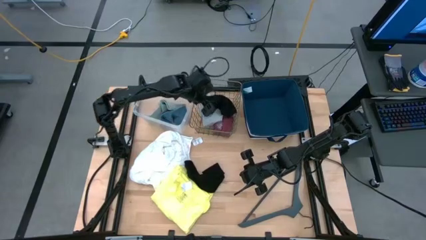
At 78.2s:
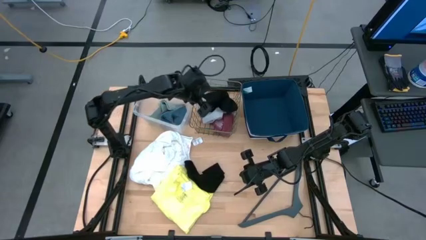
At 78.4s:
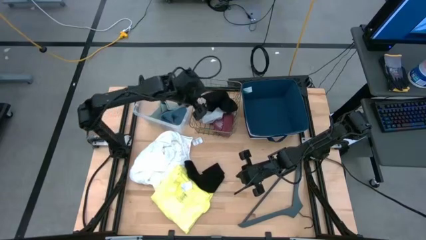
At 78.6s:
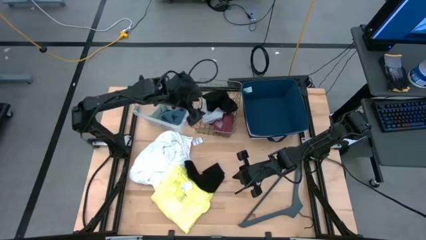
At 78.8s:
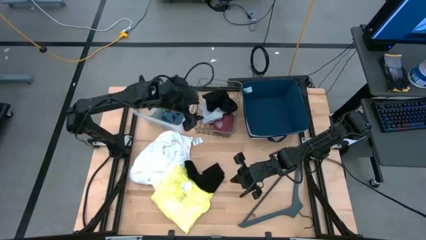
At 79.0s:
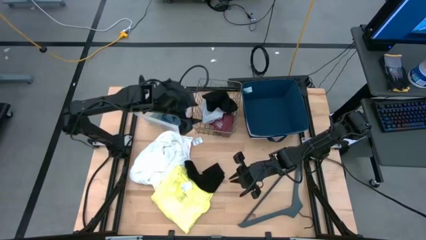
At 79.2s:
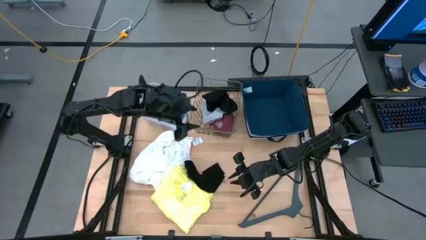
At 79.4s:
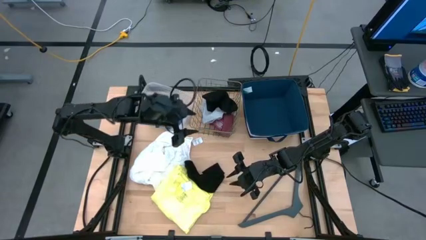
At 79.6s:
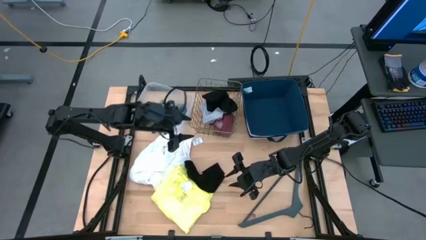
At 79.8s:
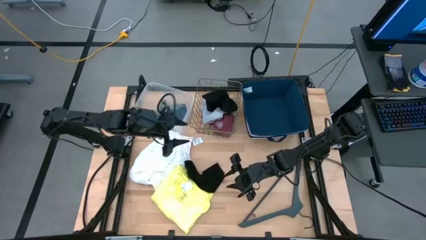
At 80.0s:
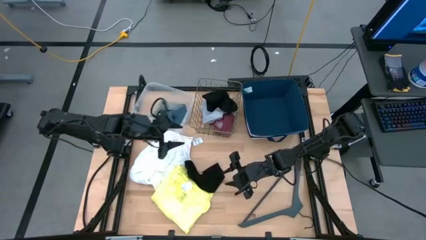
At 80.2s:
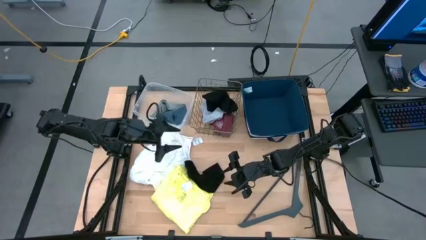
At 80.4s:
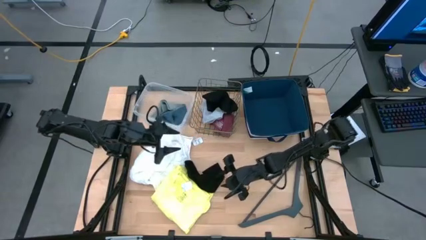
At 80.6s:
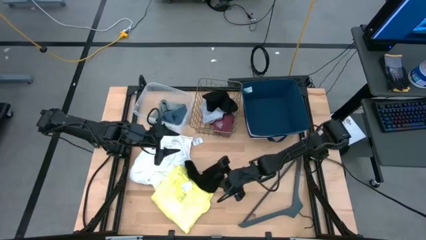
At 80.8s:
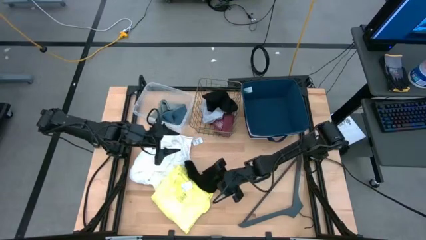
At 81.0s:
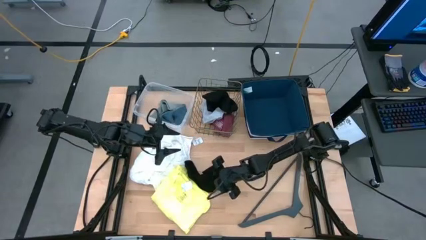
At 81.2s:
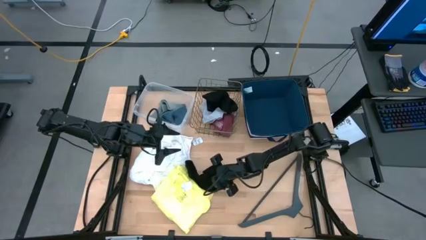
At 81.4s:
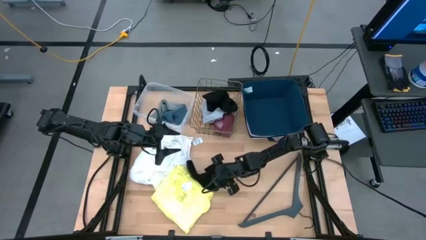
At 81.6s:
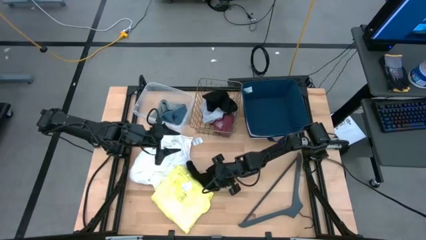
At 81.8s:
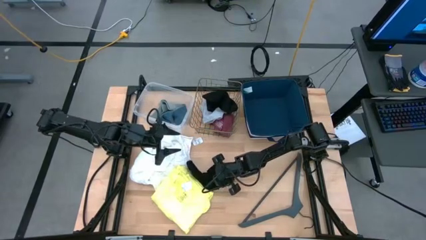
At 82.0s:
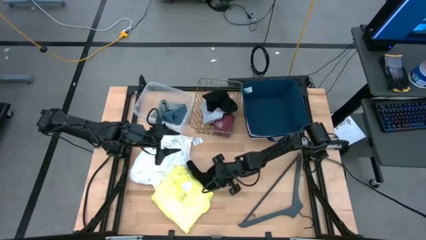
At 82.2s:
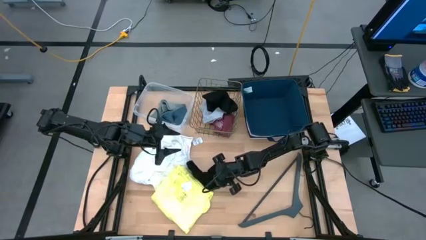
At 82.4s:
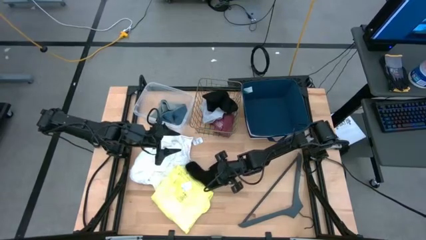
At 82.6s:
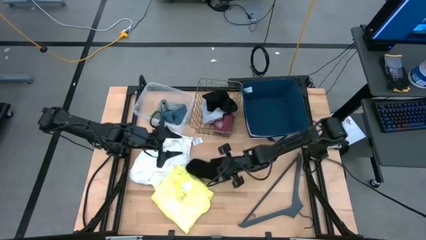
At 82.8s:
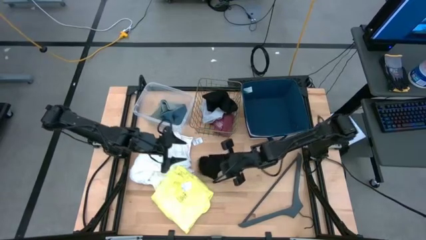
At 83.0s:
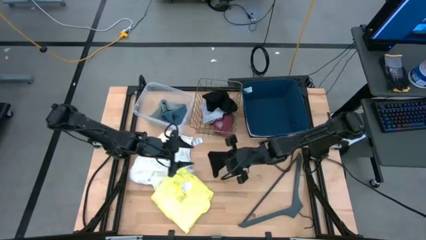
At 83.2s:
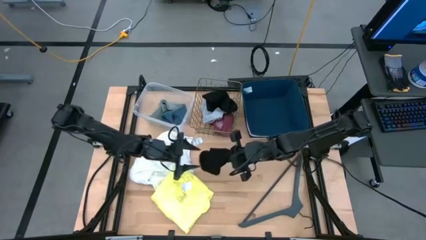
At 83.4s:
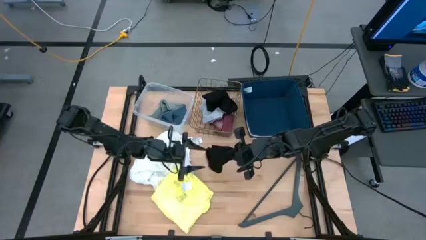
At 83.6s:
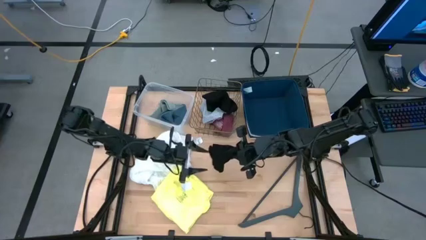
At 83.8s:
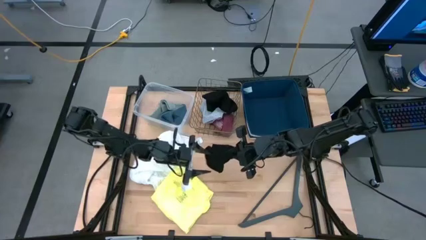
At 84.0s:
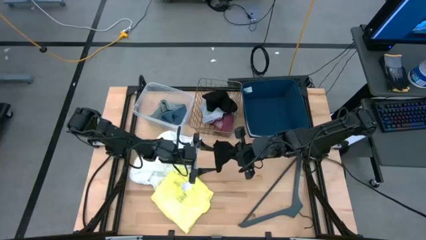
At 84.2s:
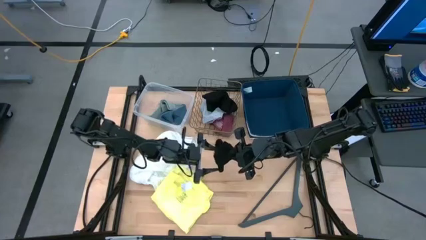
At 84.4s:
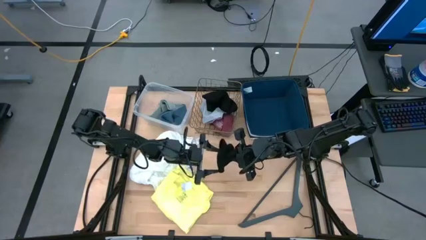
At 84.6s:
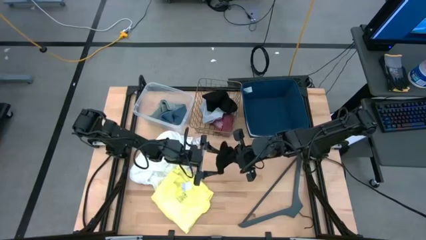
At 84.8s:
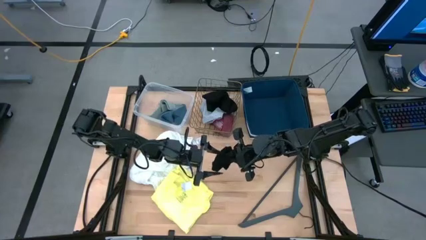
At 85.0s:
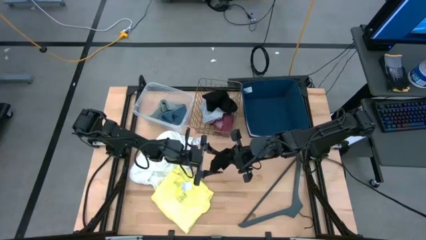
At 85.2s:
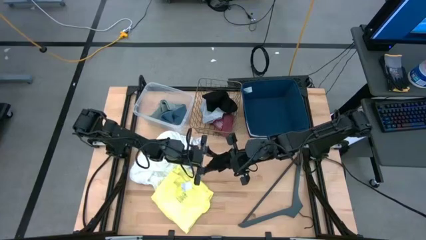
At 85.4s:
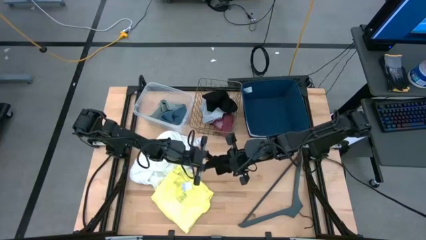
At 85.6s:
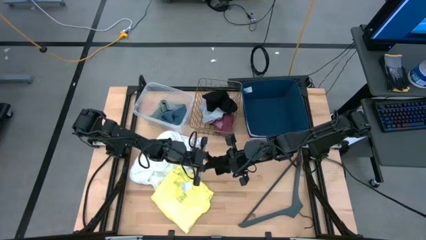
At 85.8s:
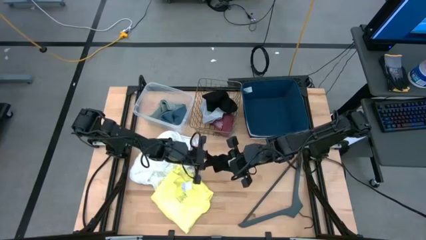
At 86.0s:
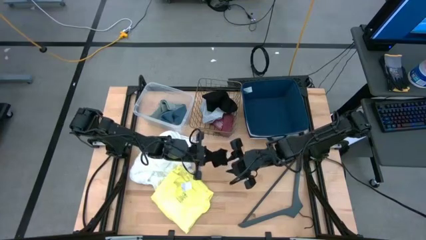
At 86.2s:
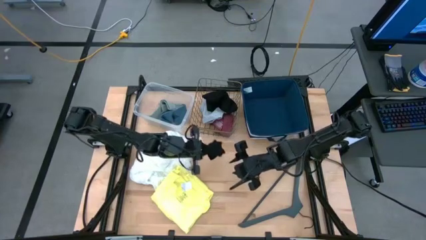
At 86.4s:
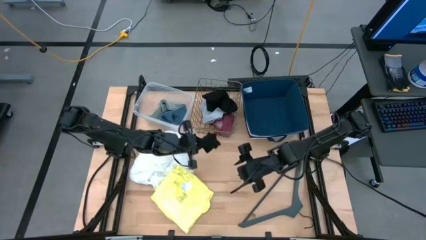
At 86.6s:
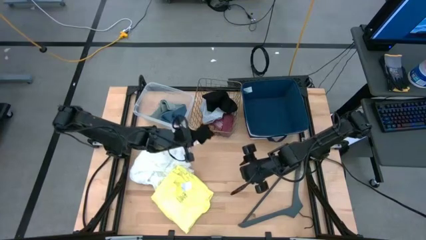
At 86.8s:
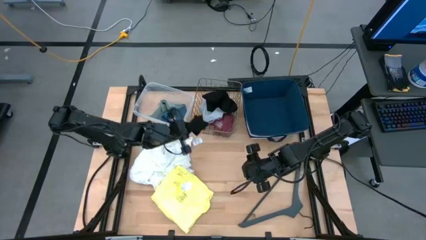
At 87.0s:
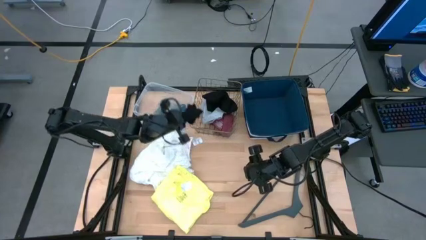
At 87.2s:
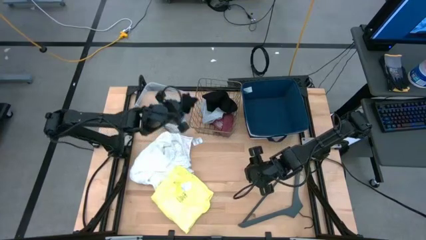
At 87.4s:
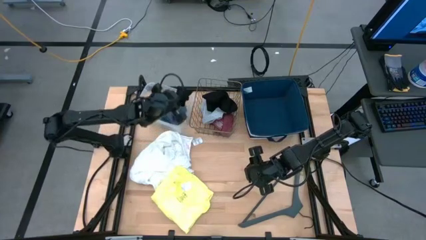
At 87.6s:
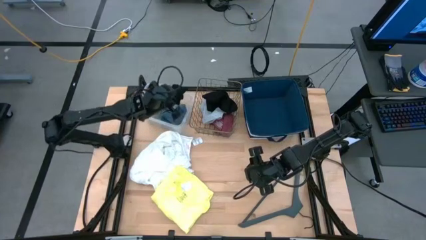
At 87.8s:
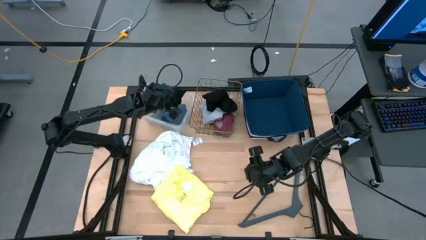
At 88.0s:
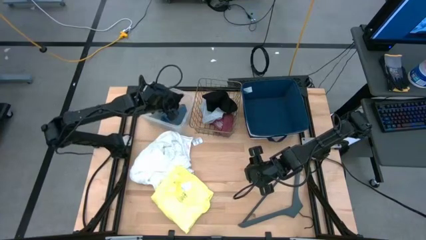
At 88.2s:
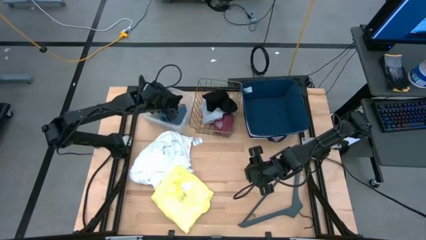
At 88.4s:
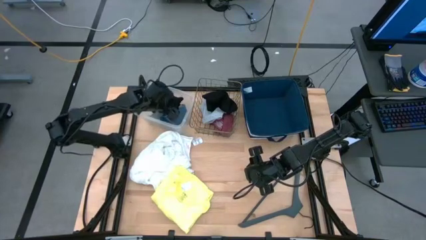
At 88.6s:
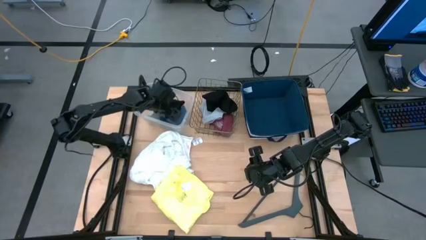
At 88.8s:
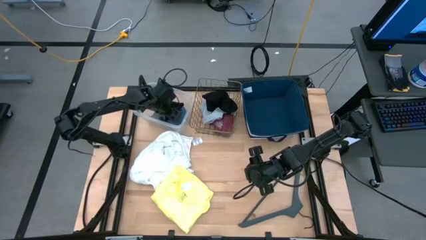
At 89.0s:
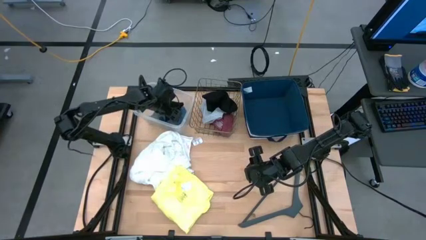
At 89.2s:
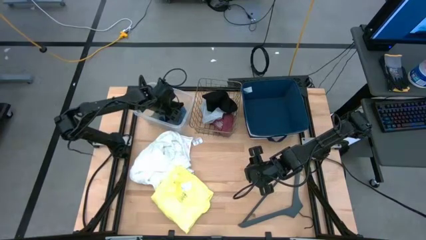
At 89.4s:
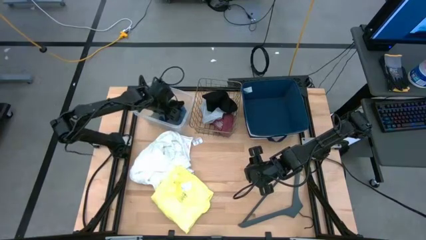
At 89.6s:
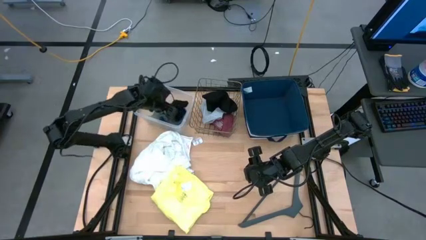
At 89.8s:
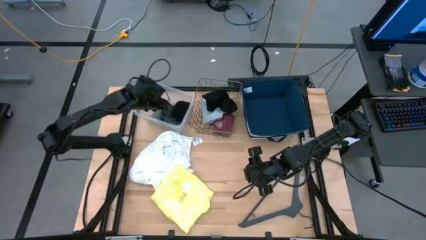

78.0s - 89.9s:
Task: Pick & Place Cloths
Put the black sock into the transparent bin
